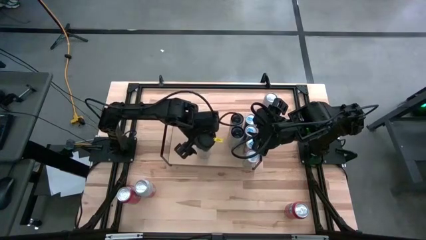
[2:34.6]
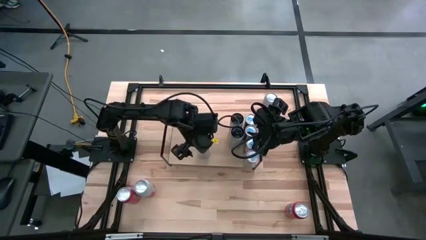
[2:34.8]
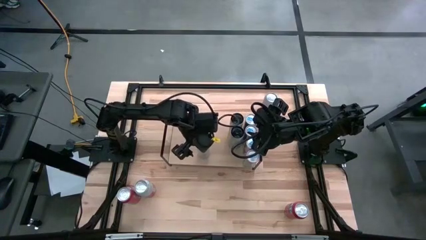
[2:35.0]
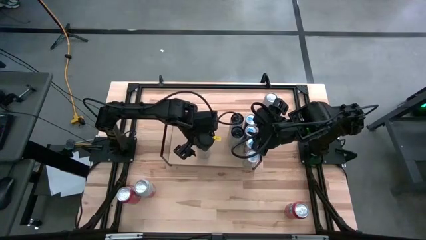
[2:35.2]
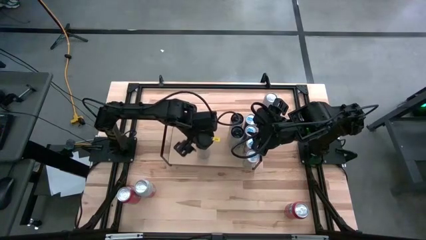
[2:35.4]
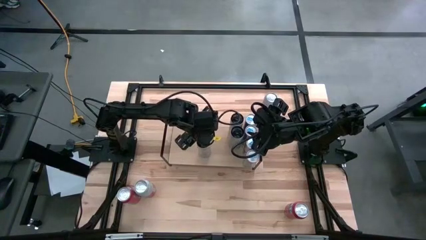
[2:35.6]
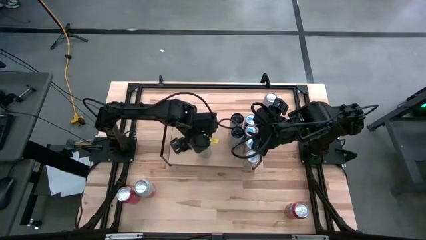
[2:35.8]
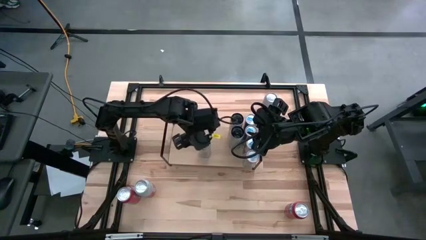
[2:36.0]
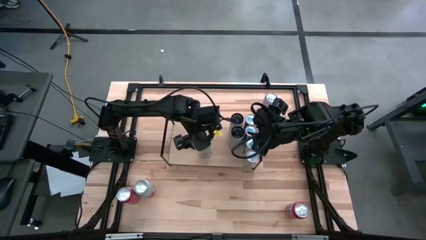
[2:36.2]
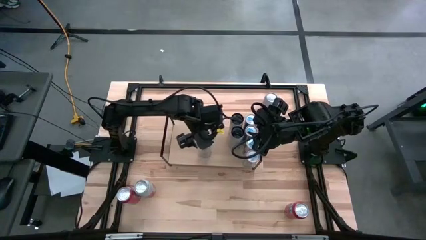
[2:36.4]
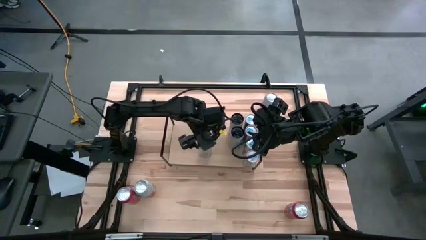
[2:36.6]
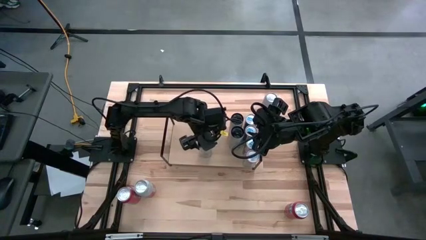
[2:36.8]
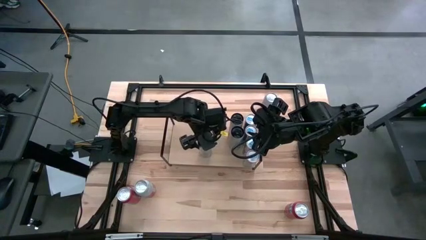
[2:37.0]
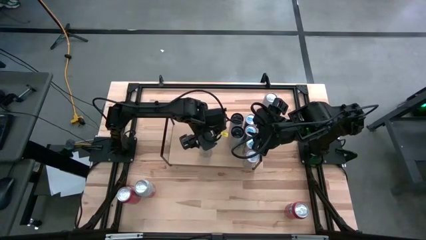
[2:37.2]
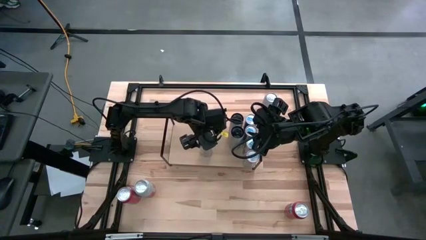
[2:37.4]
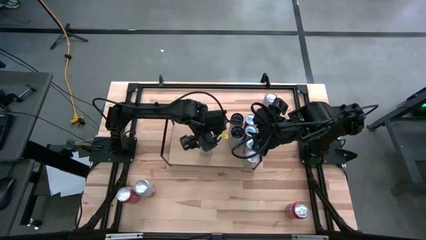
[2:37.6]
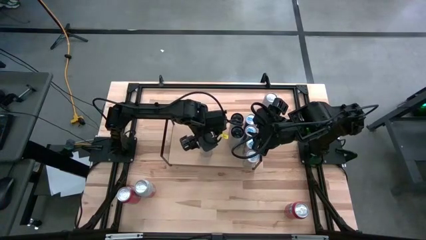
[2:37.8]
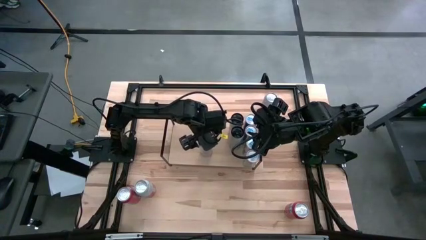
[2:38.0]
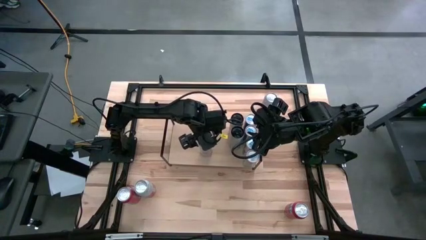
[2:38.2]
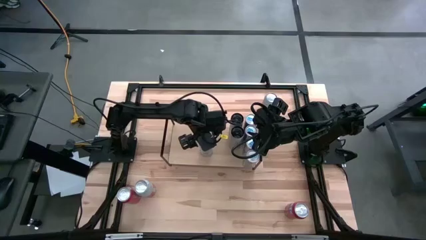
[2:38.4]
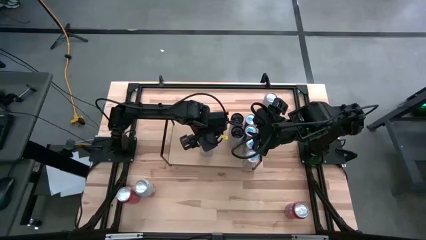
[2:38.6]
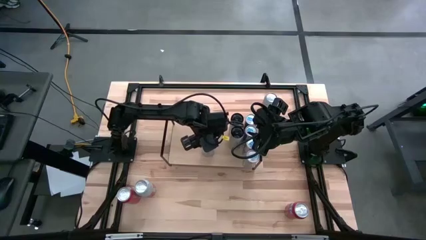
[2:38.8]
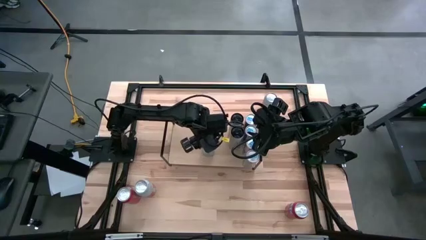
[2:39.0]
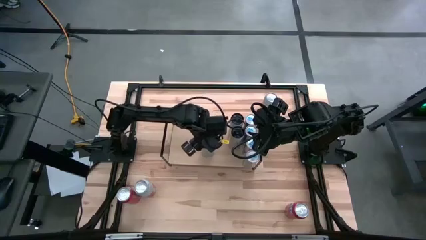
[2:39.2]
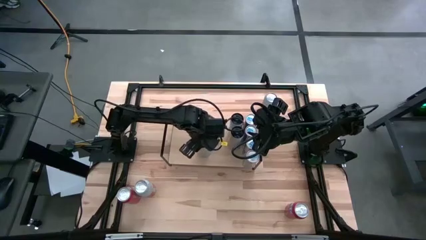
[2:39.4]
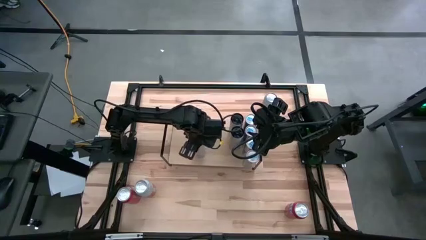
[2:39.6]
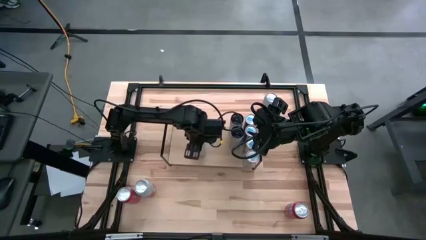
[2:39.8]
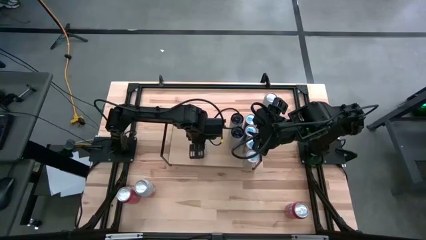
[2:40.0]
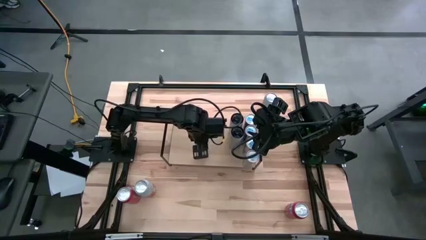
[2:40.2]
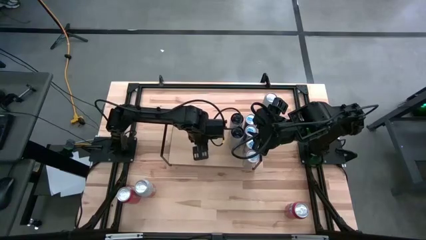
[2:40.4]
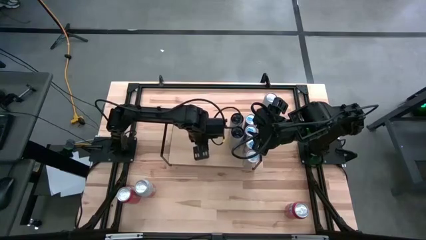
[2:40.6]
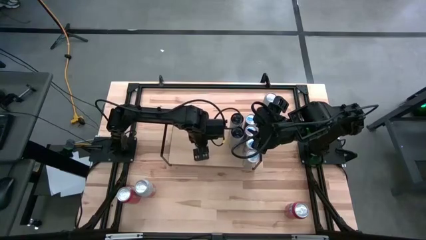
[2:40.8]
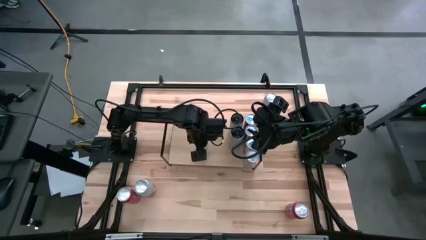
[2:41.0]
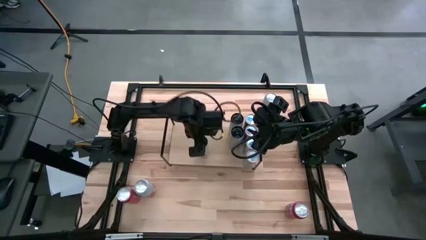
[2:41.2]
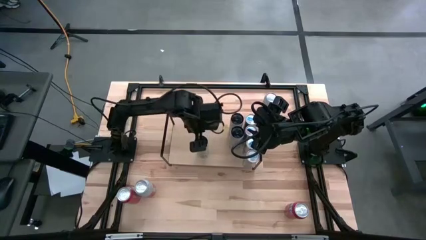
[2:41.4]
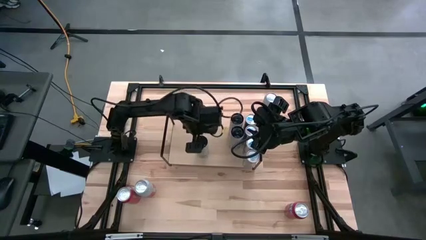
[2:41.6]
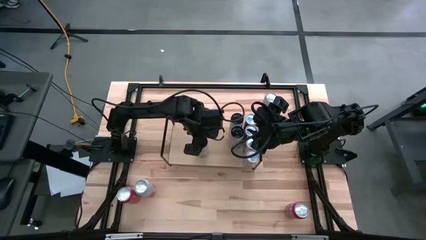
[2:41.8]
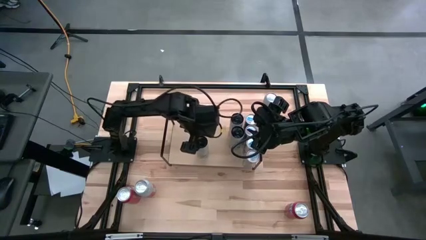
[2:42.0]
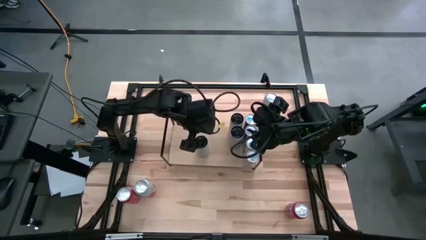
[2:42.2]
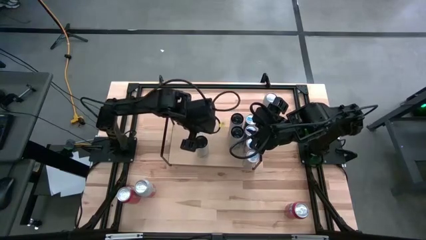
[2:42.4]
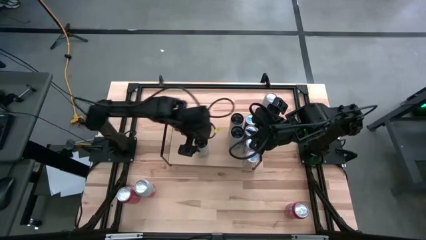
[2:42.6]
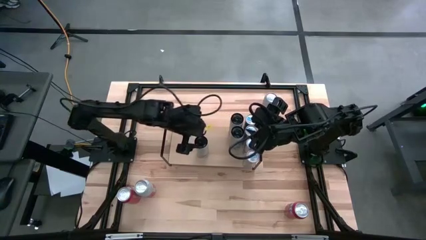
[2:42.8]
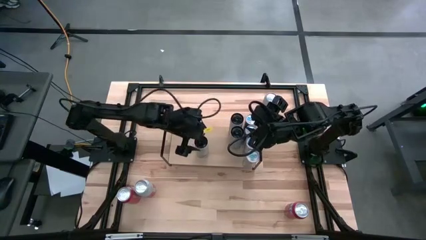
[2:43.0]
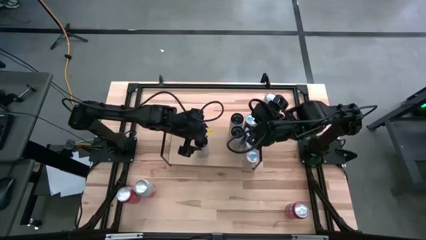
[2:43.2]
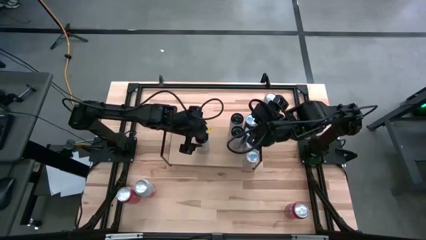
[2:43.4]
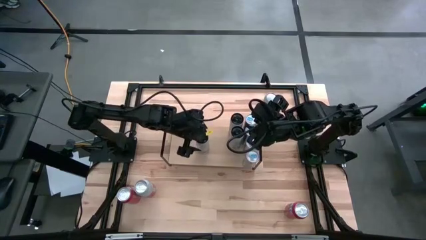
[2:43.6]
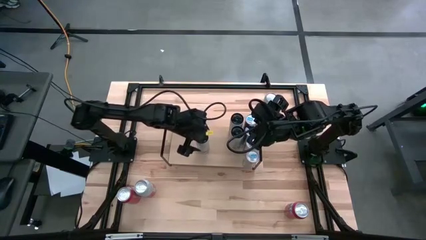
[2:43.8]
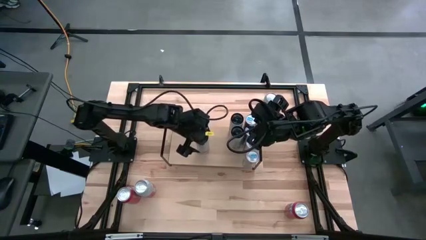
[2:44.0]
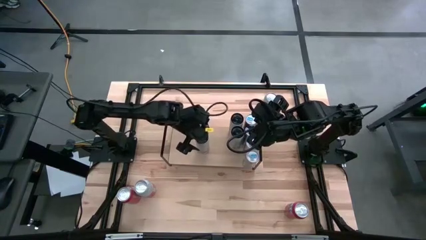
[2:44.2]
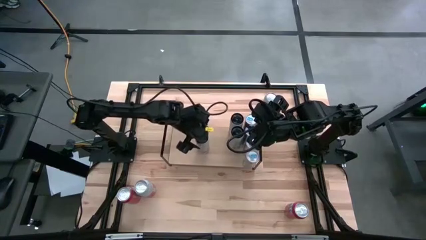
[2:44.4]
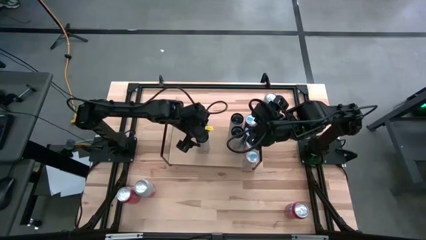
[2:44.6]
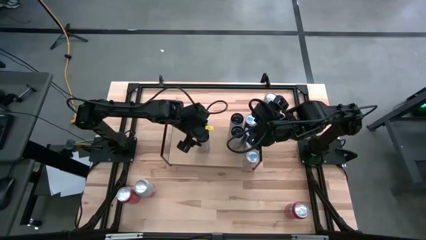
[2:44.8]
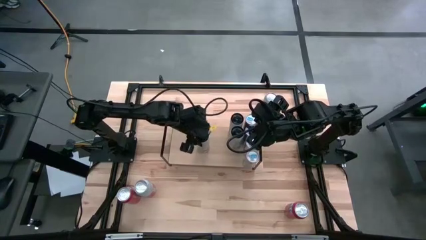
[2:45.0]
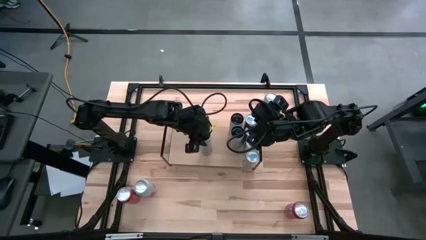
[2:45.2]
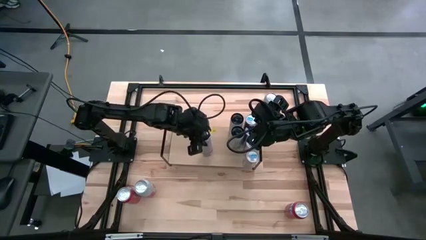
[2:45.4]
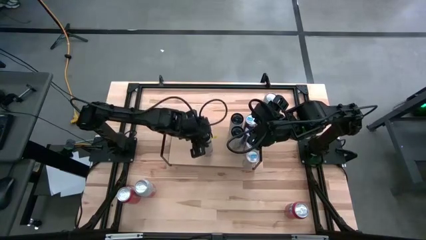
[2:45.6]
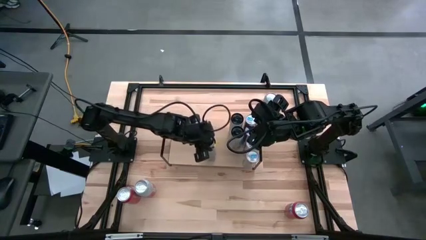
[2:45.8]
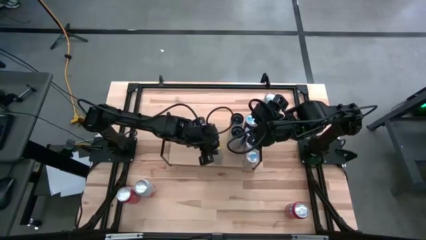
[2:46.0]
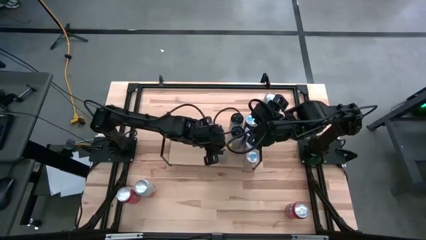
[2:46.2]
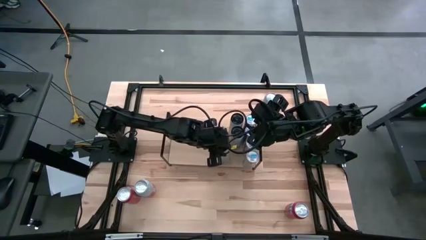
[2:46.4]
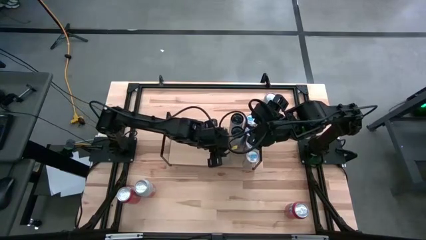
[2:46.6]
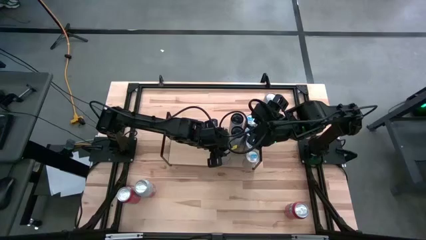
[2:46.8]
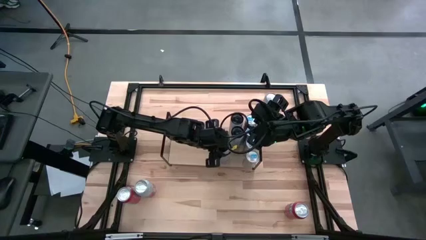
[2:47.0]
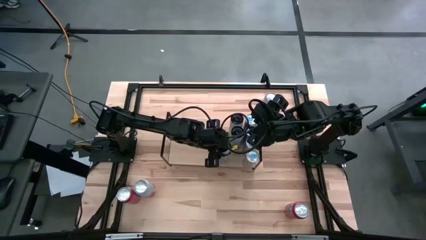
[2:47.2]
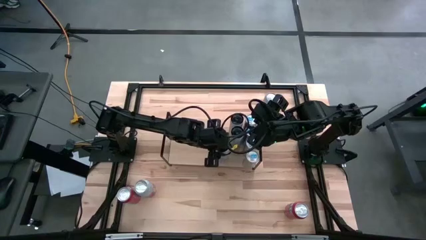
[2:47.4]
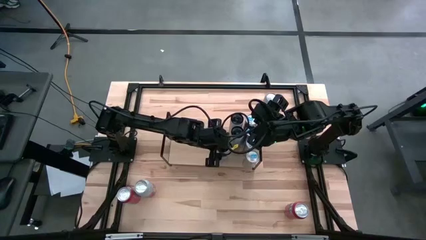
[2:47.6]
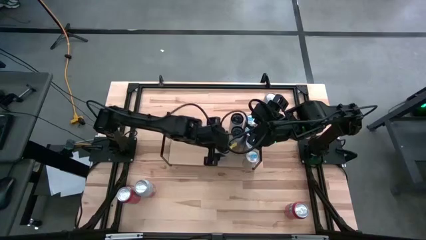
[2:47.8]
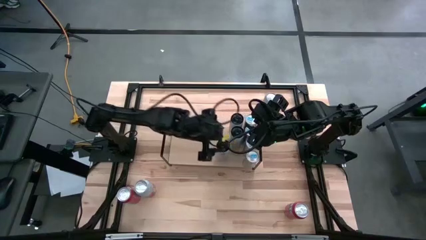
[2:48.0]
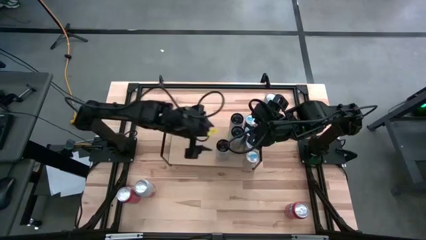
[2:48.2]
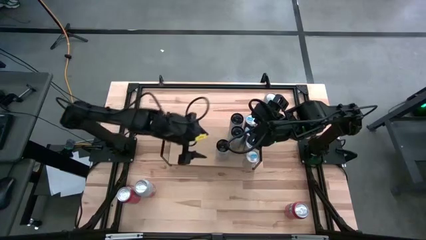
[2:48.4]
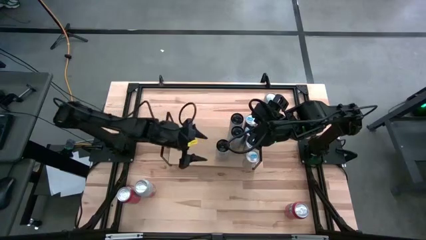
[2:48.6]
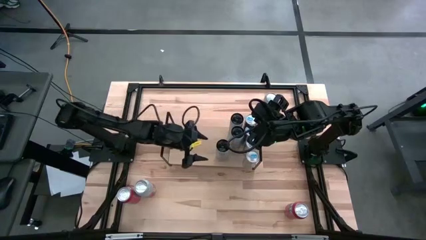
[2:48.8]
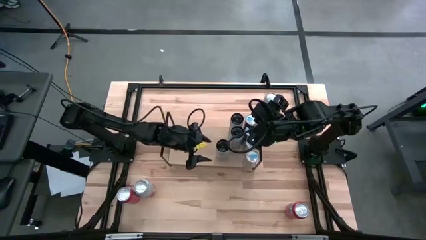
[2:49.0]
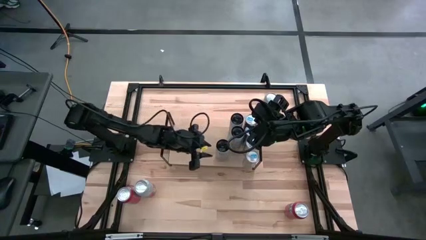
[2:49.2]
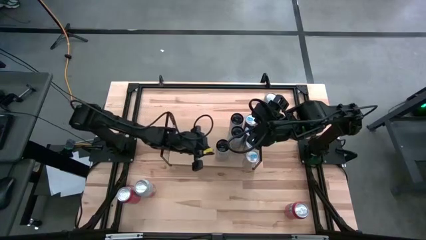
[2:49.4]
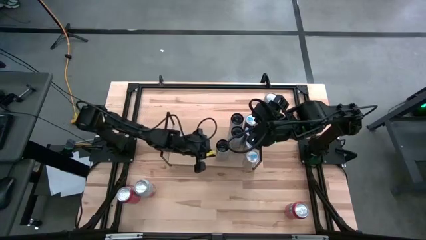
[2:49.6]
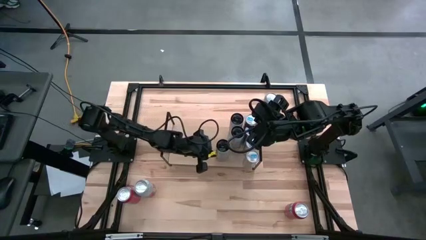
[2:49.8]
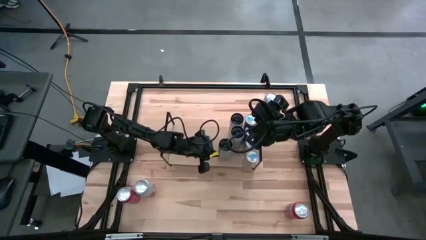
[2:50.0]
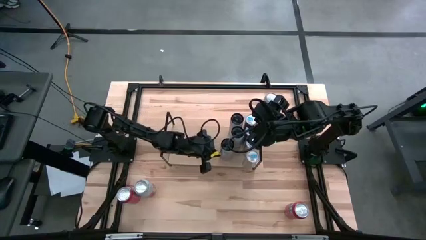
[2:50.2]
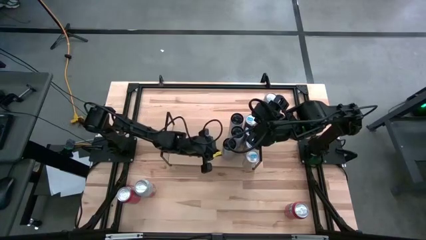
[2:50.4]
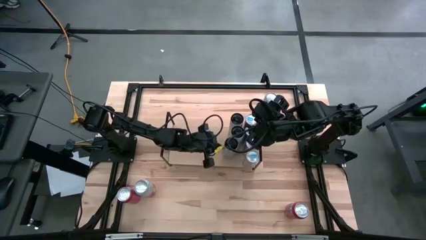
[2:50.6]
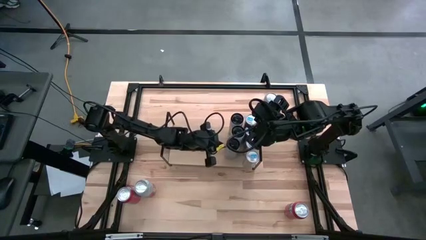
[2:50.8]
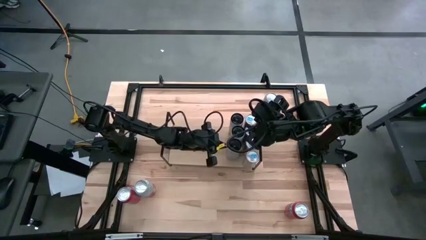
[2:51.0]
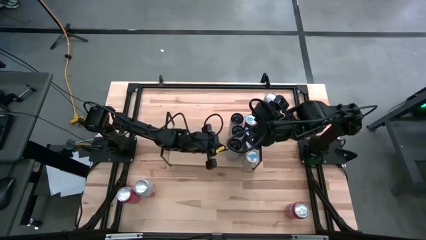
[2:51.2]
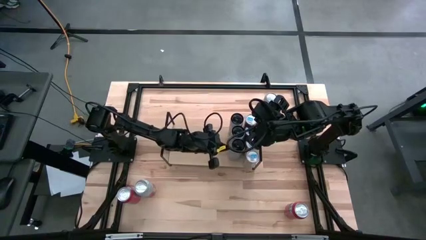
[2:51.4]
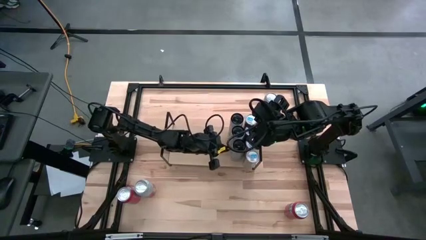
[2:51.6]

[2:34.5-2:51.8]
Task: Place canned beverage on shelf
Put the black soda can aligned with the other black soda can on the shelf
